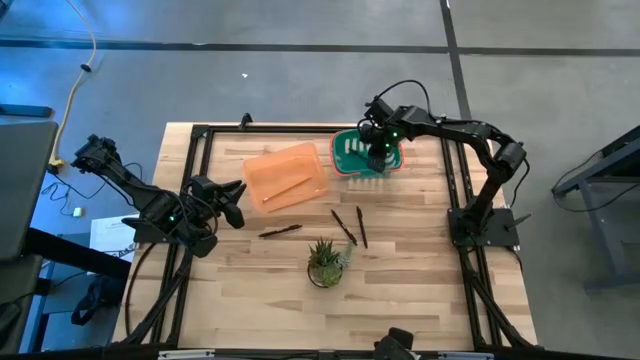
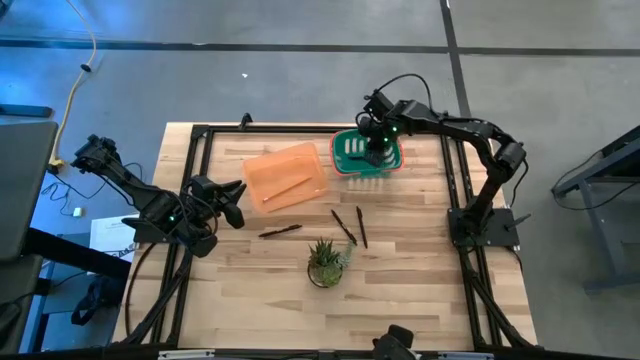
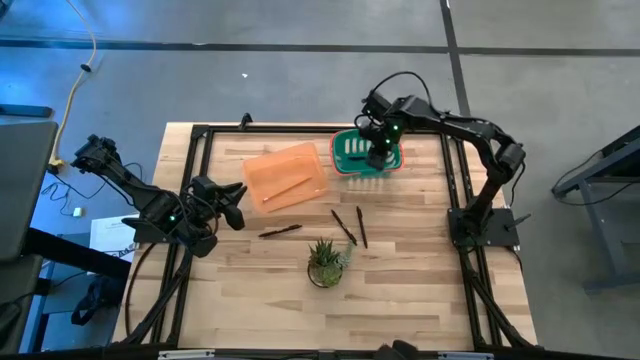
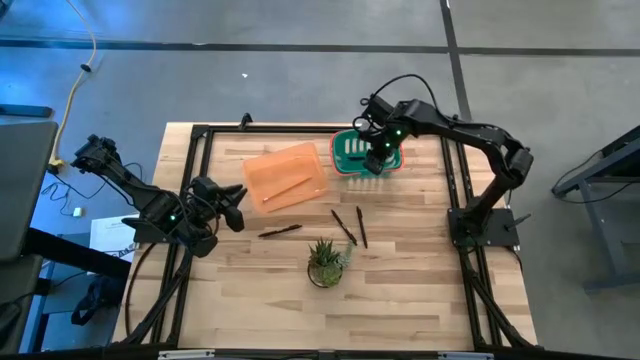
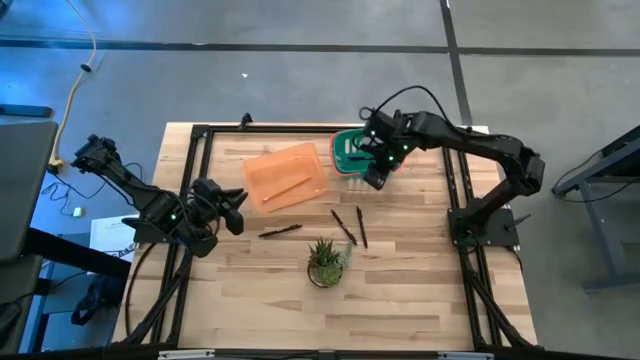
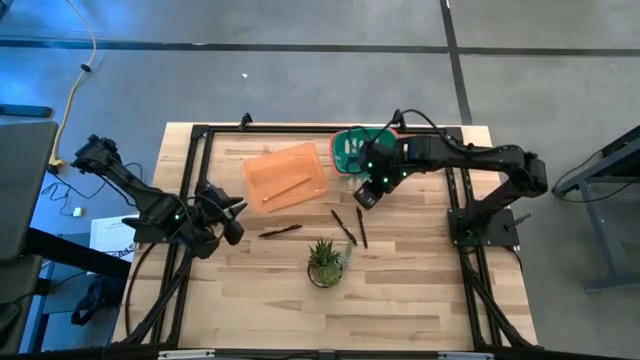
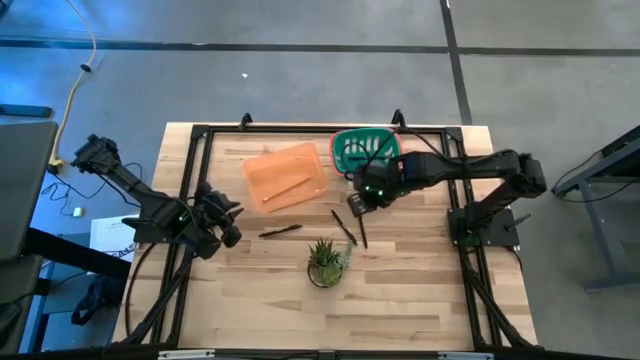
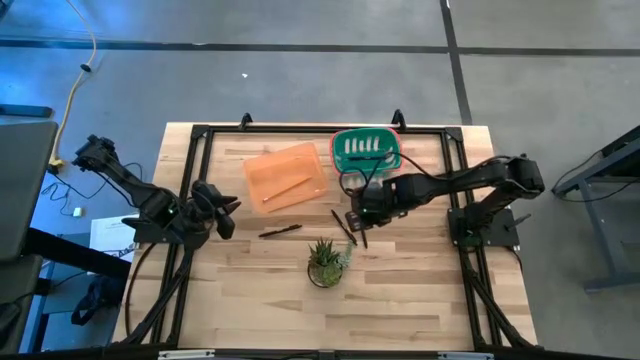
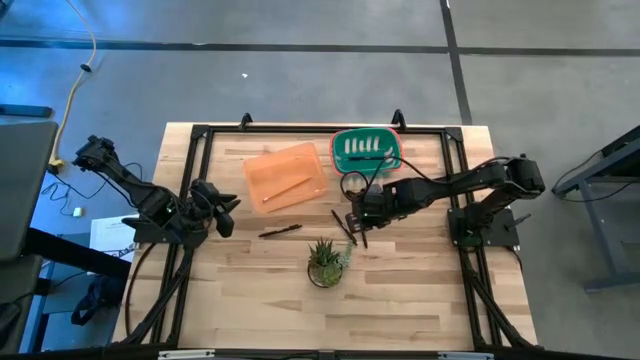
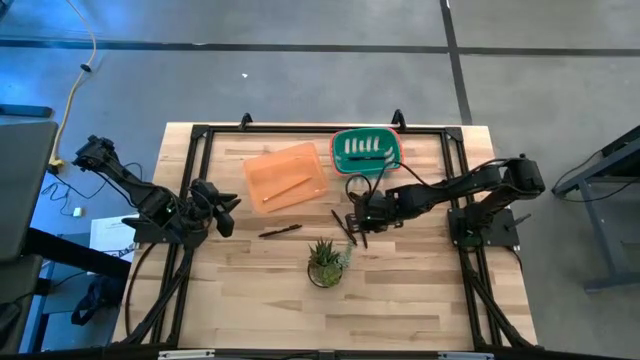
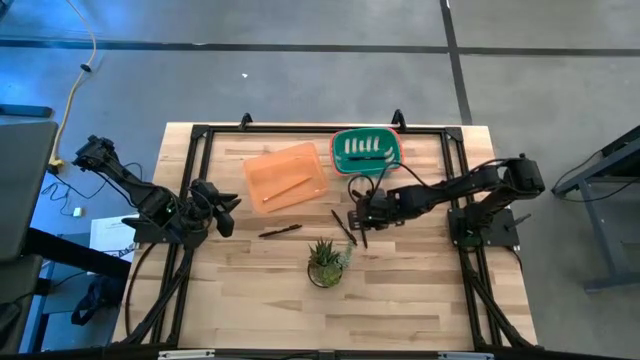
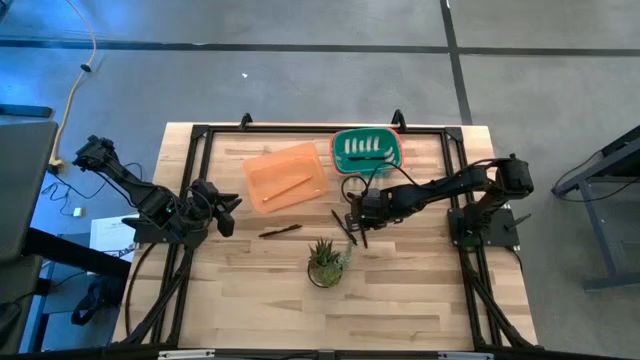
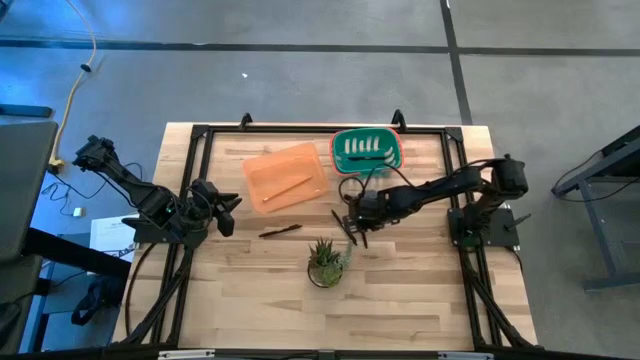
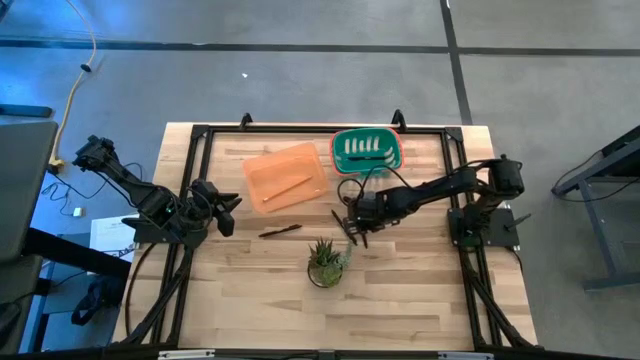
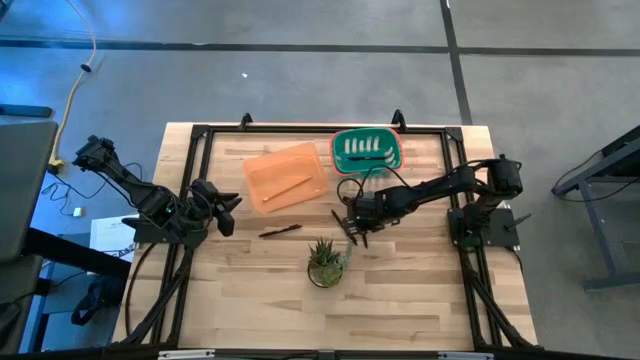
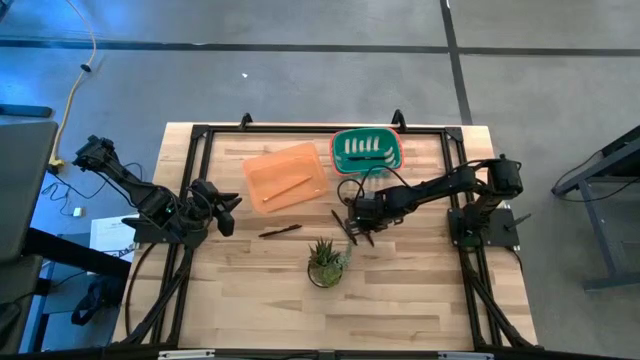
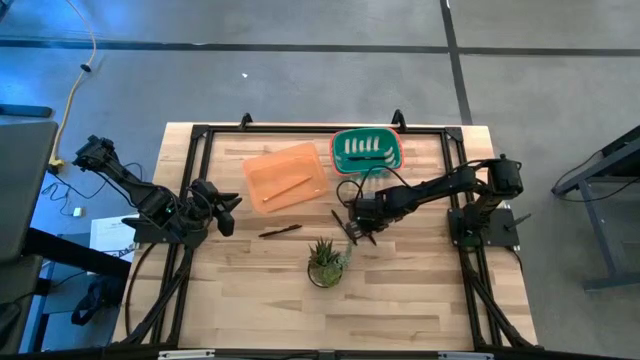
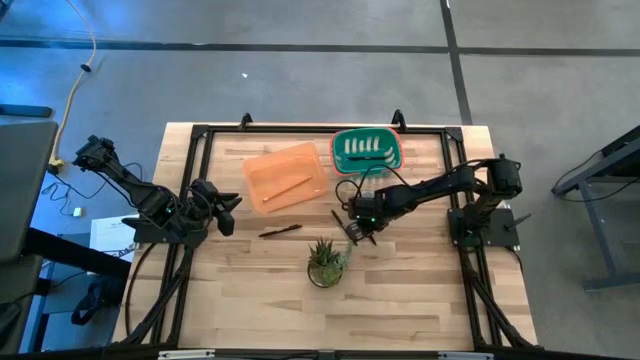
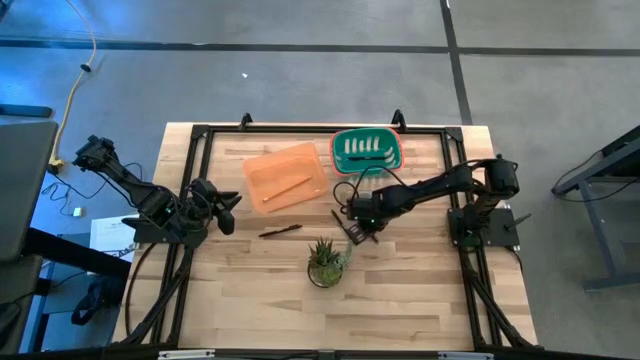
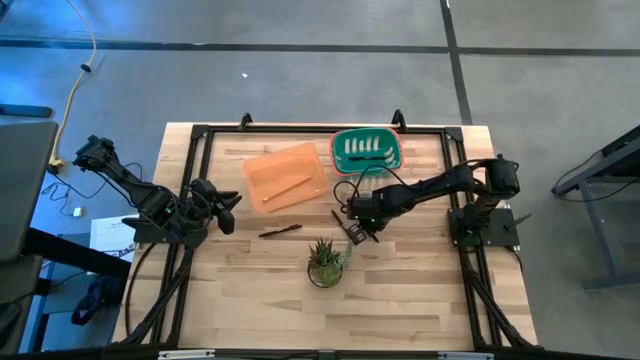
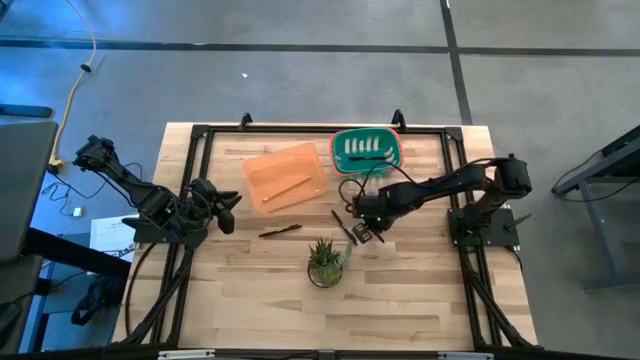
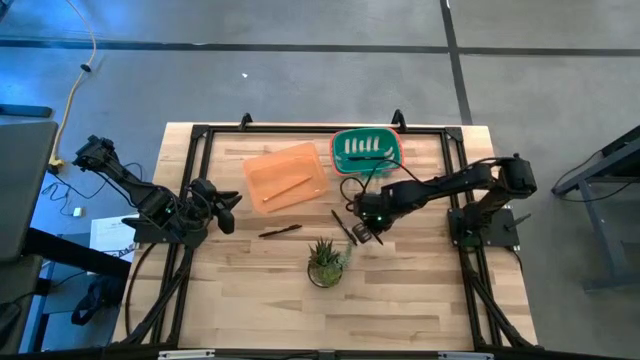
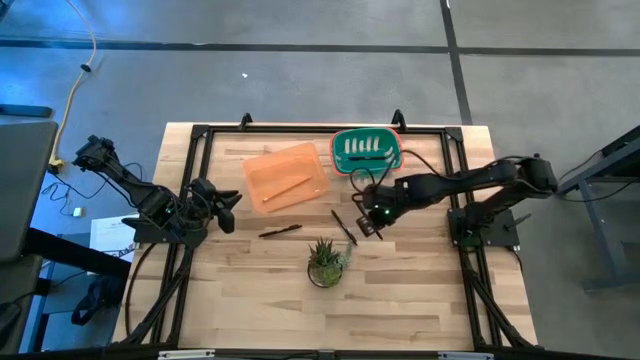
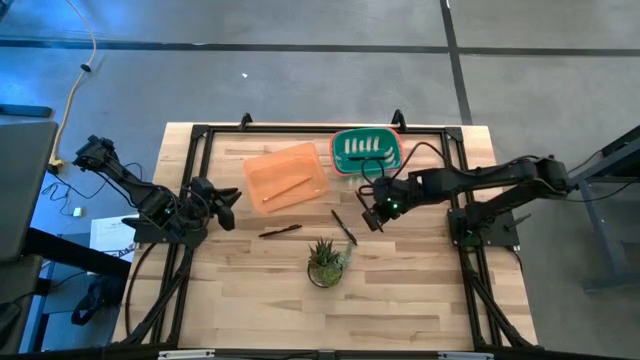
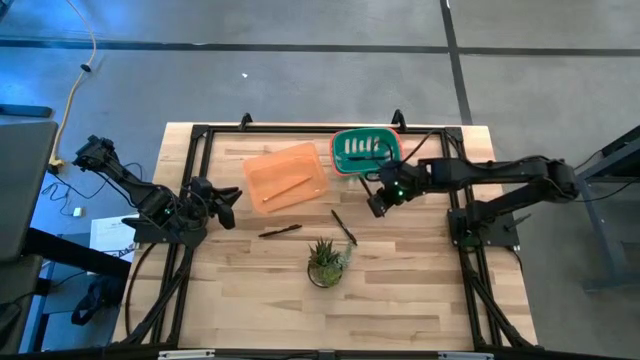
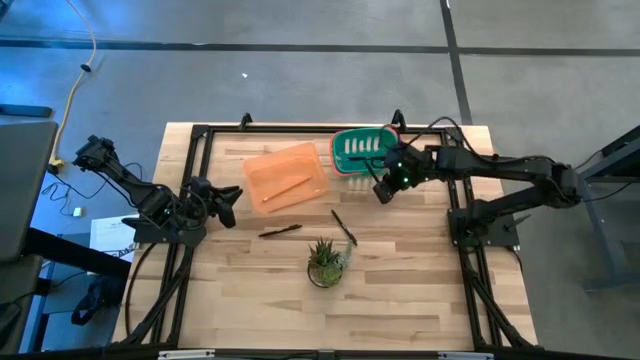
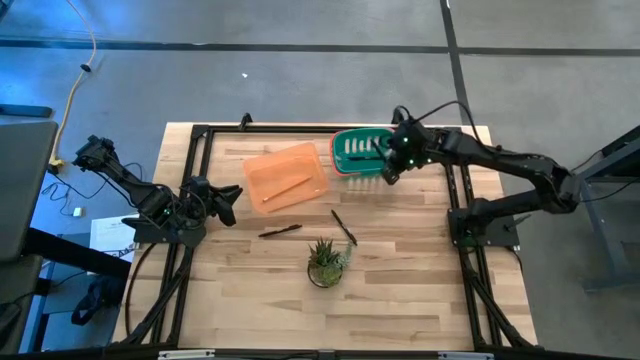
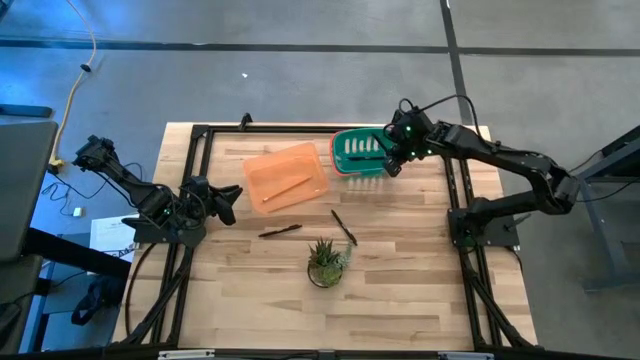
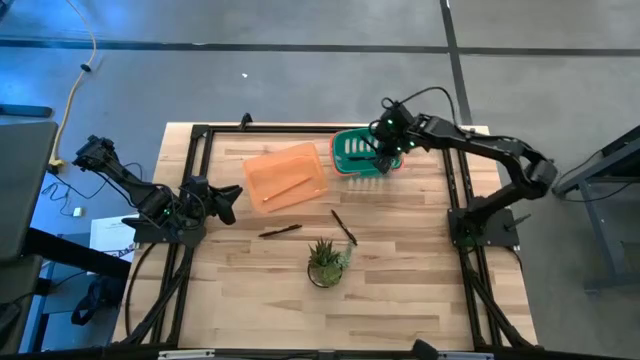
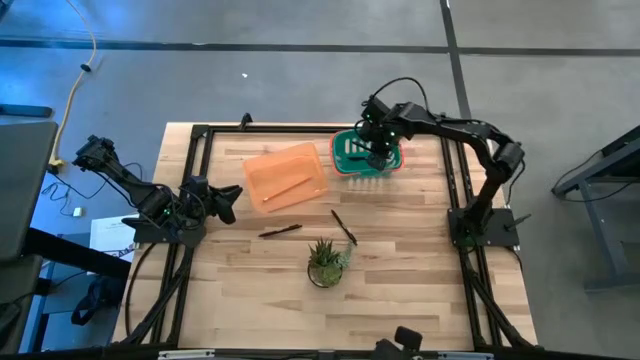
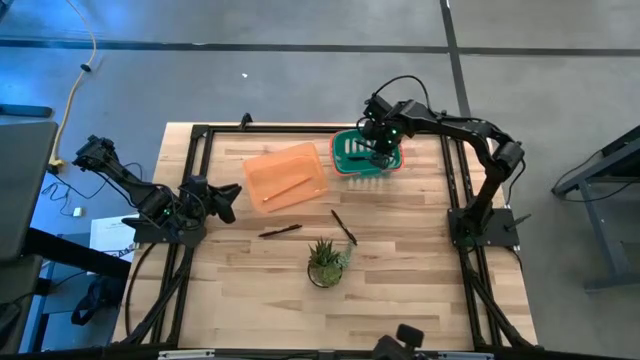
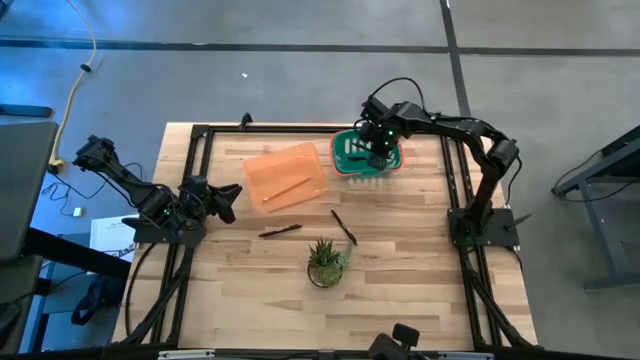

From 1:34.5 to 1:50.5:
Task: Sort pens & pencils
Put the black pen into the green basket

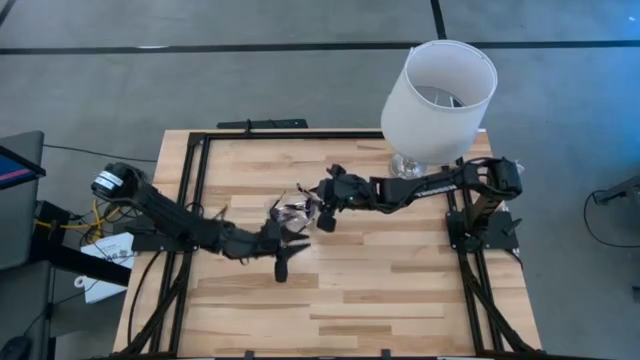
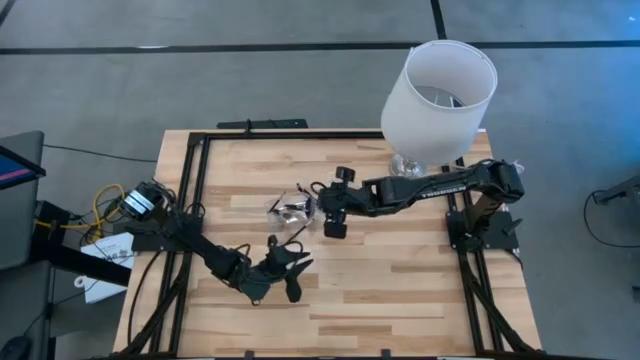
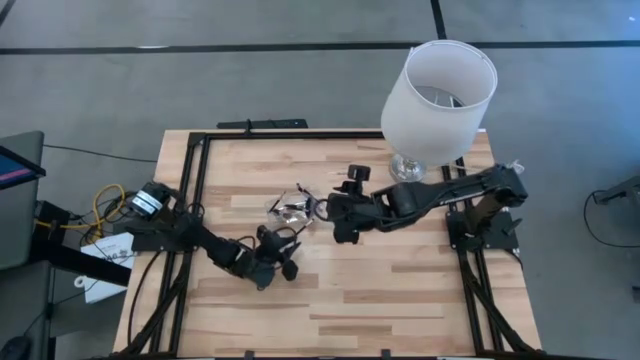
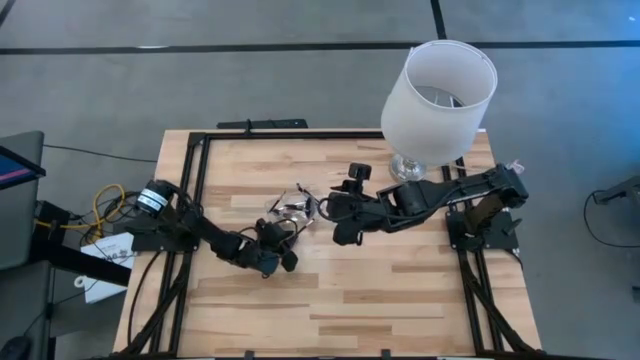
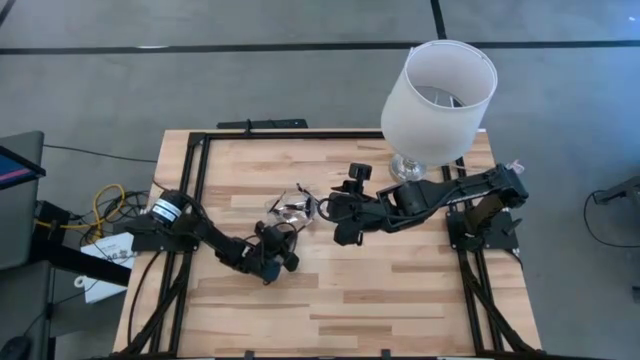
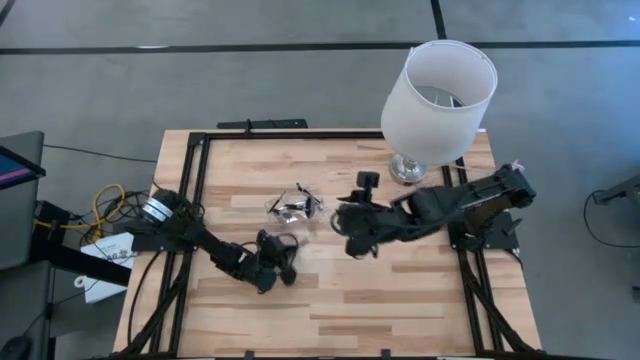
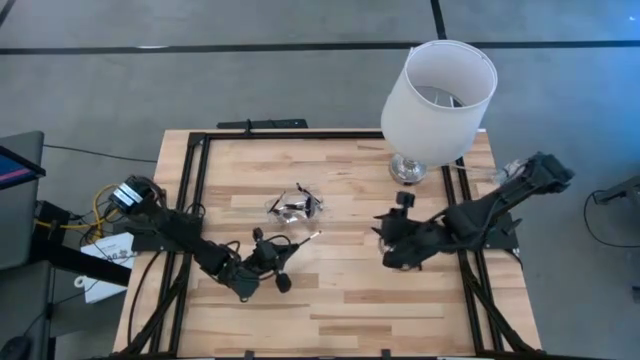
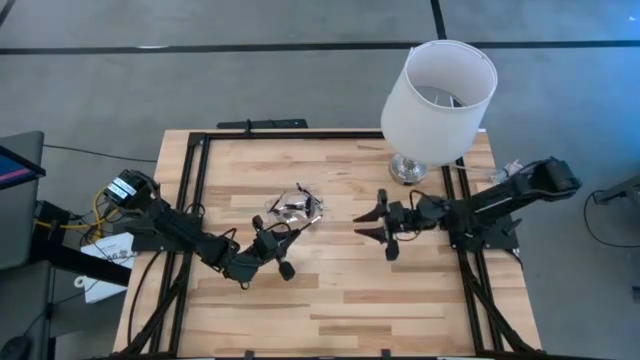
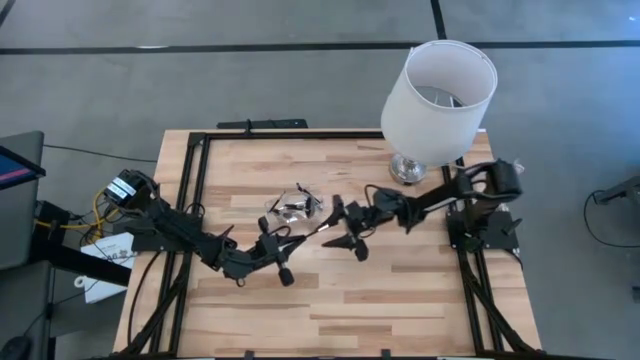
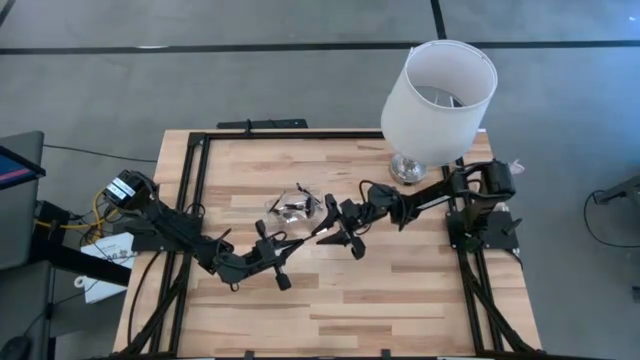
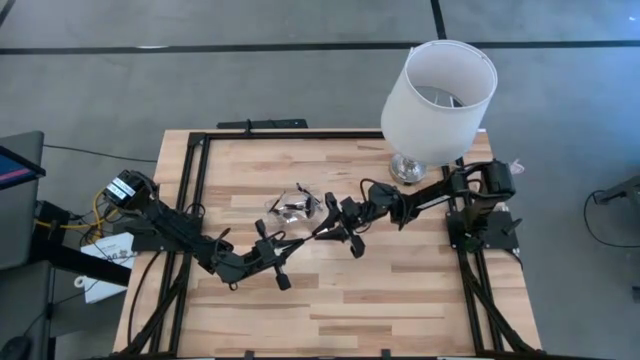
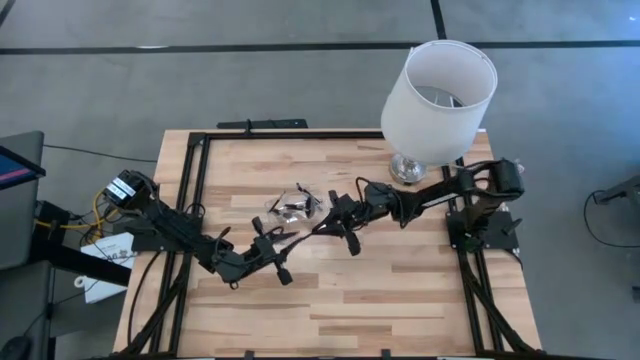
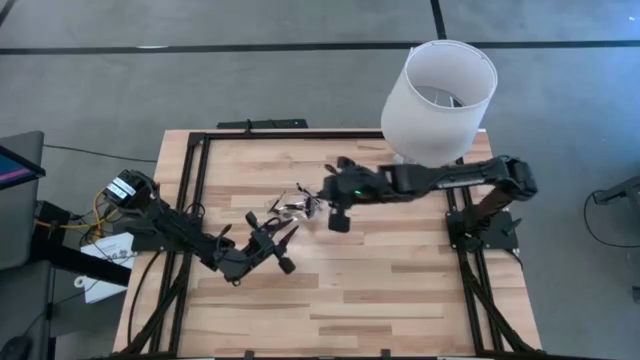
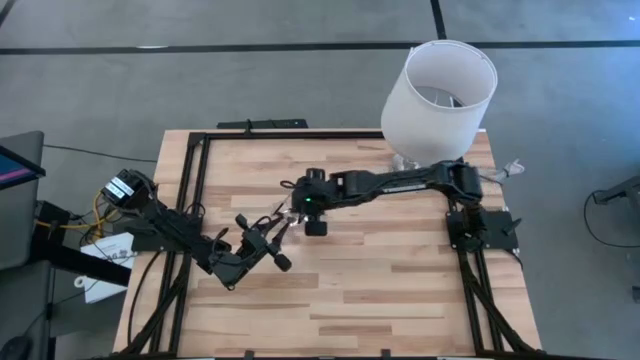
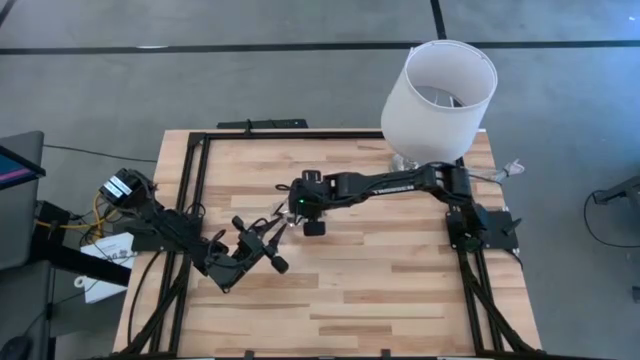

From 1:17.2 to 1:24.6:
Task: Pick & Place Makeup Supplies
Put the black makeup brush into the transparent organizer
